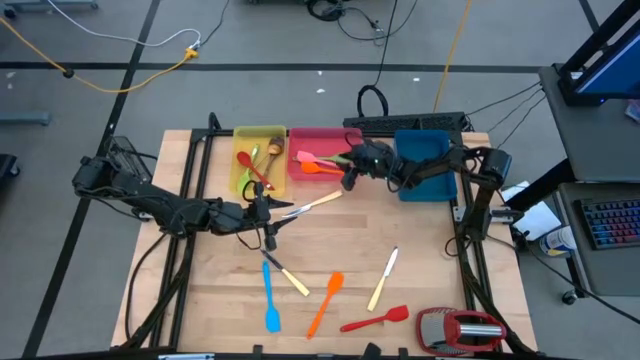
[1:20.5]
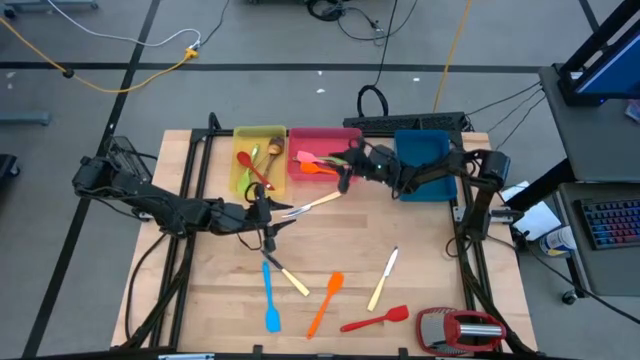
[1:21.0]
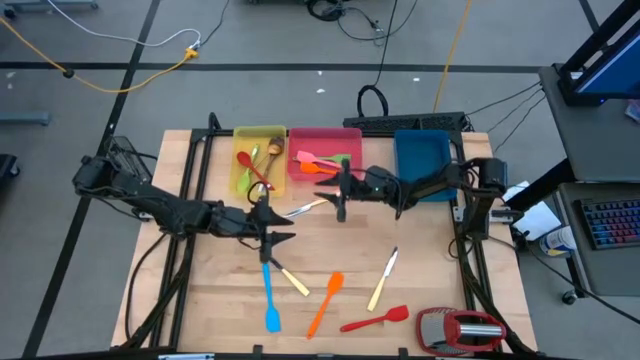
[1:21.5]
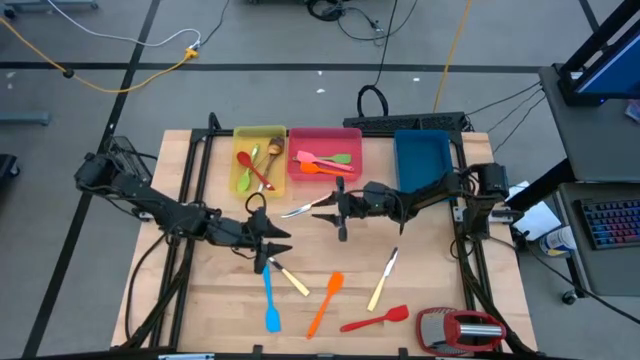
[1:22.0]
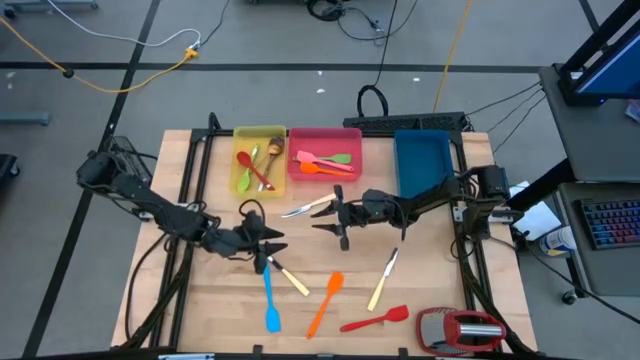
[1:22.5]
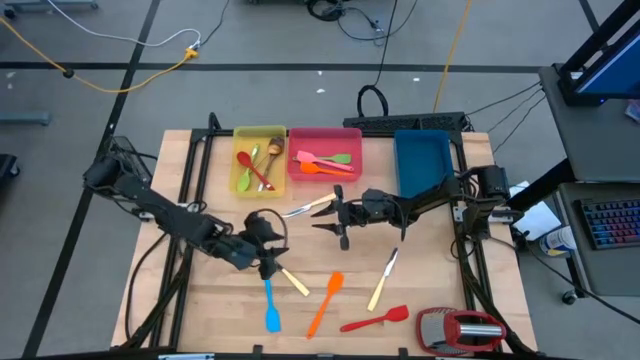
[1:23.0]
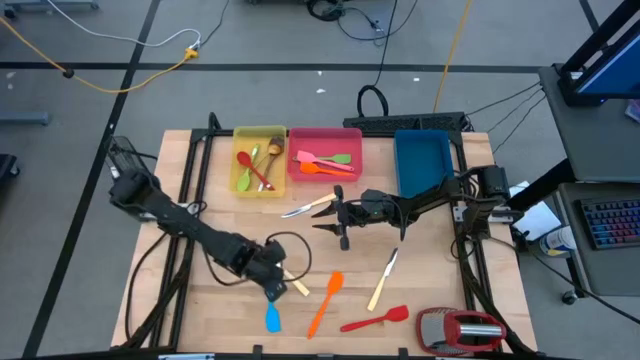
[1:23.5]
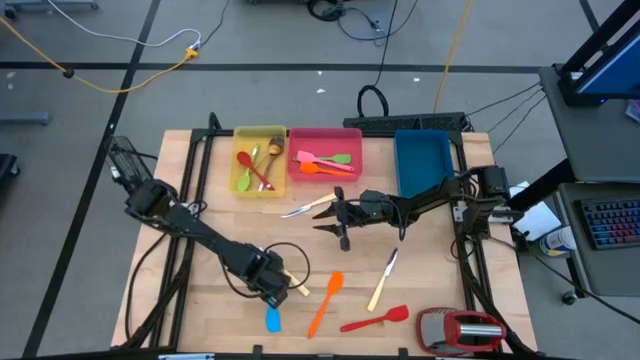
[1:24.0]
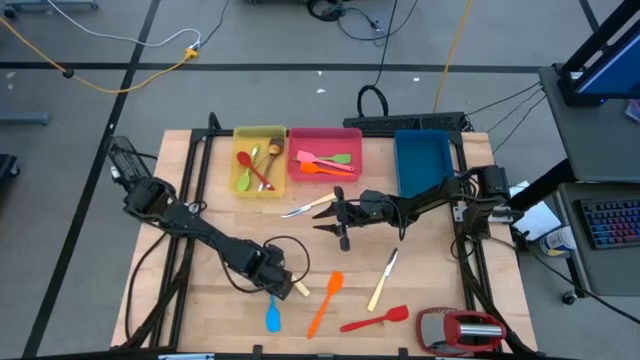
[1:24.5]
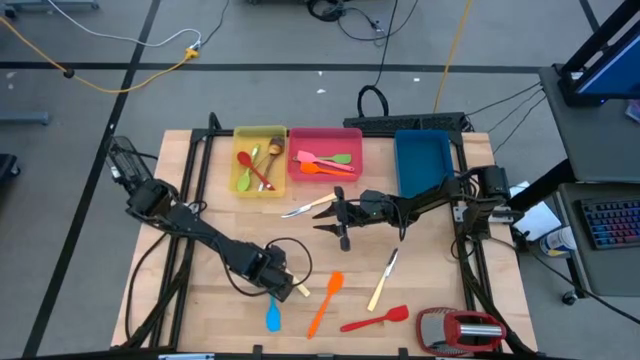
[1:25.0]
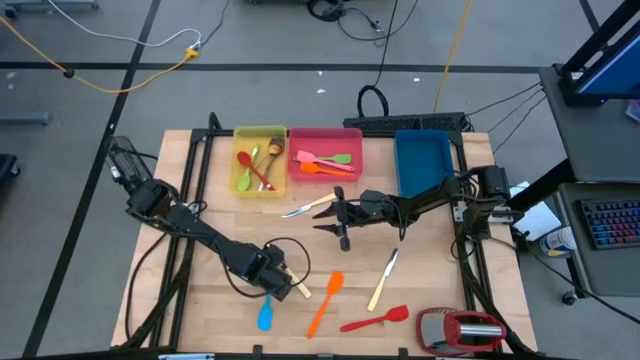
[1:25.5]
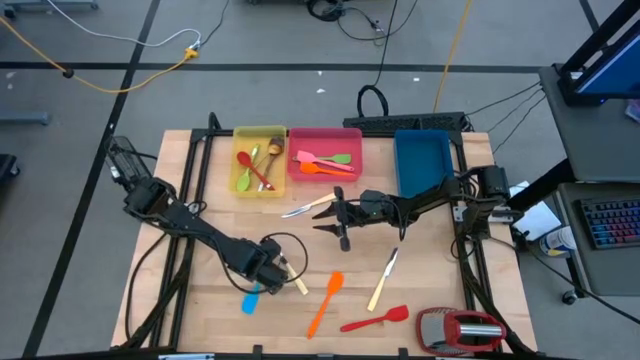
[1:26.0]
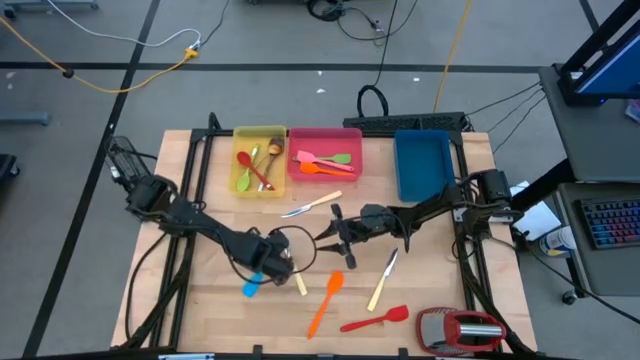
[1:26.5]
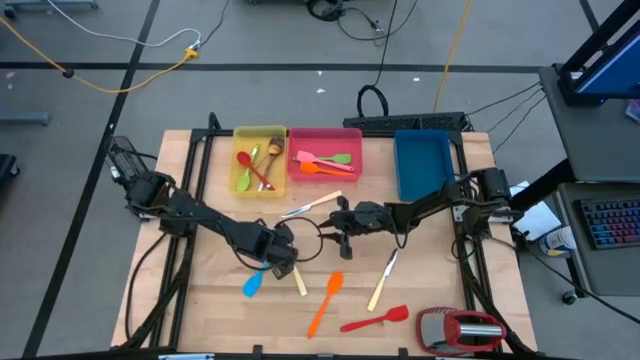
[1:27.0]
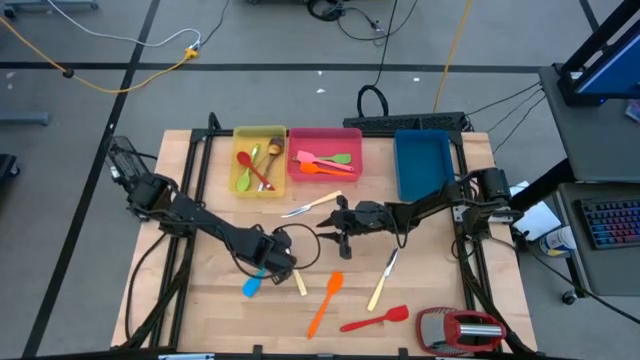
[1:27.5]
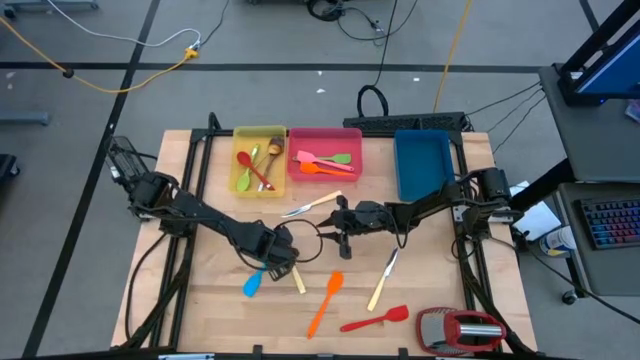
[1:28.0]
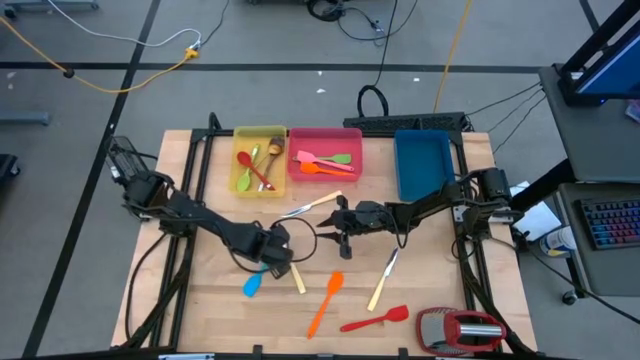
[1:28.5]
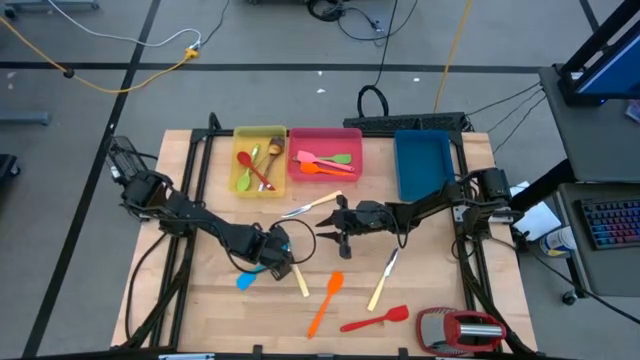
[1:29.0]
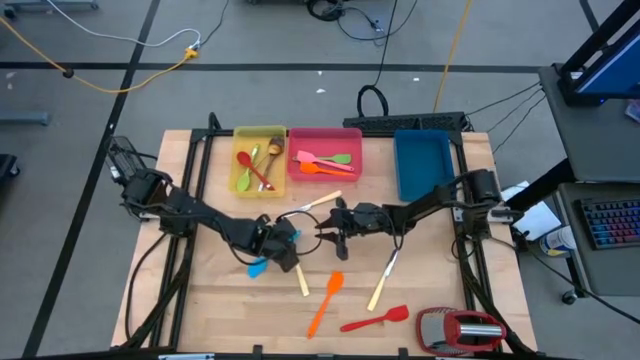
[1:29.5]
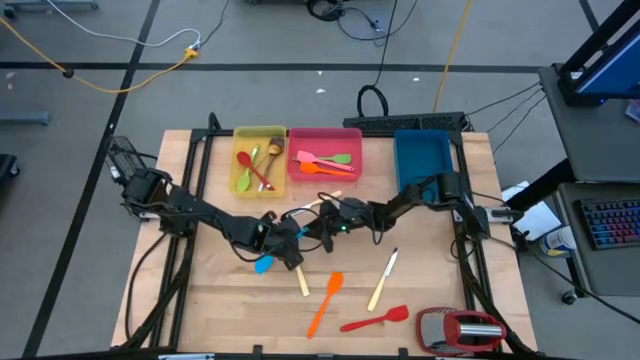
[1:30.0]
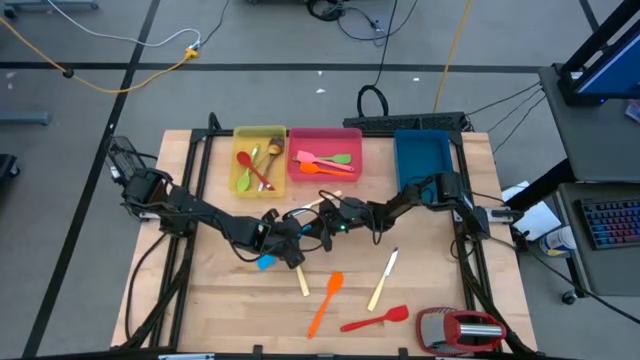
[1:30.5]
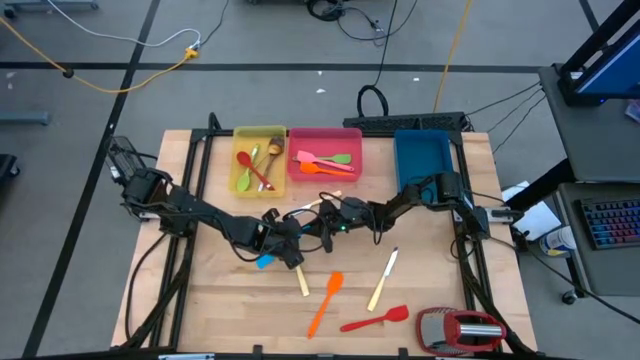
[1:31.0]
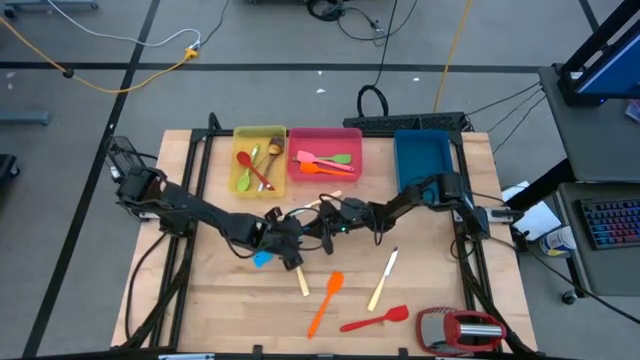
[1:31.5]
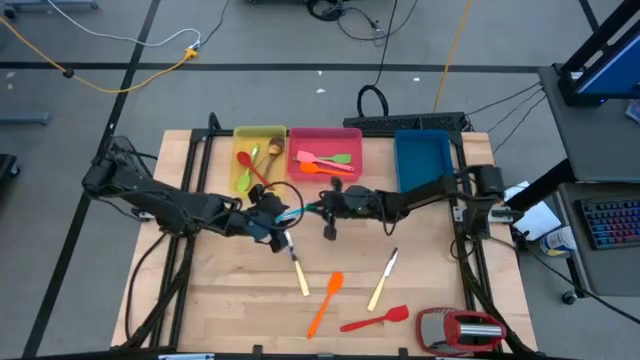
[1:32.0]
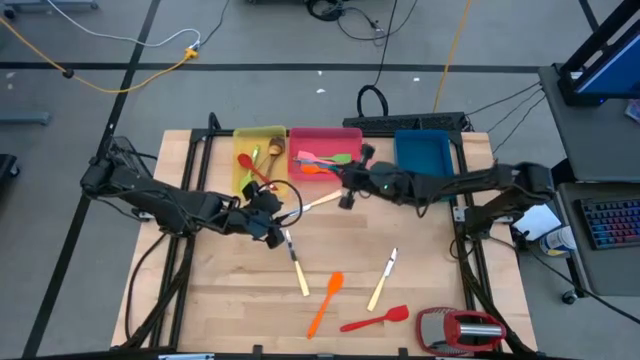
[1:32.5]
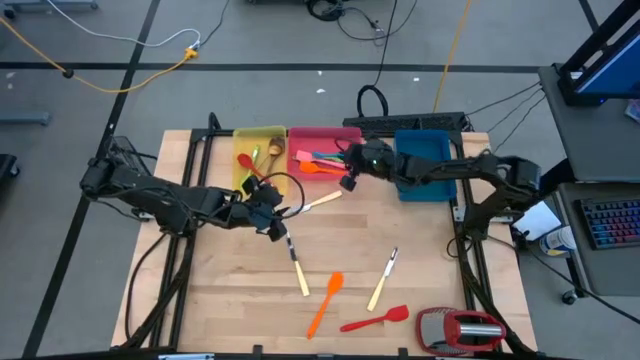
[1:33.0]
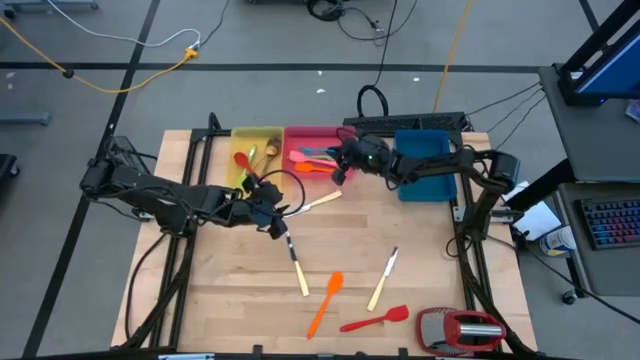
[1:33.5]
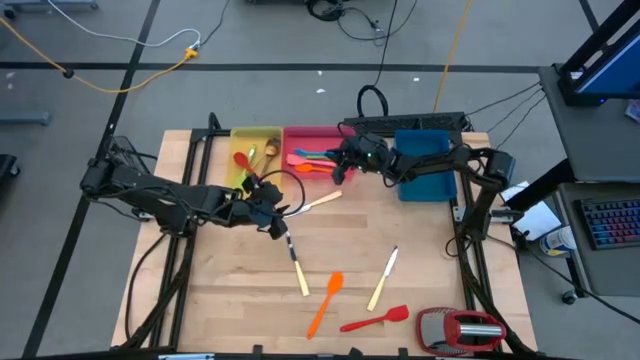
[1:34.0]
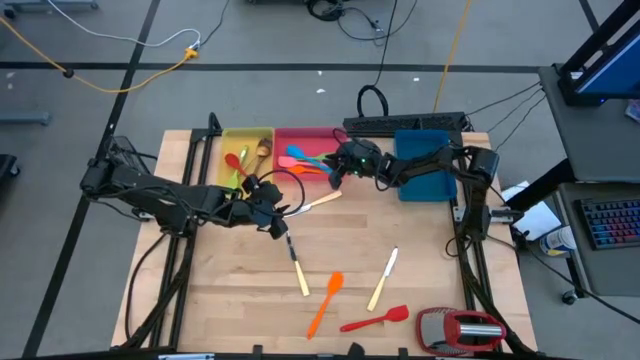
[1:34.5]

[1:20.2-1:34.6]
Task: Pick & Place Kitchen Items
Put the blue spatula into the red bin

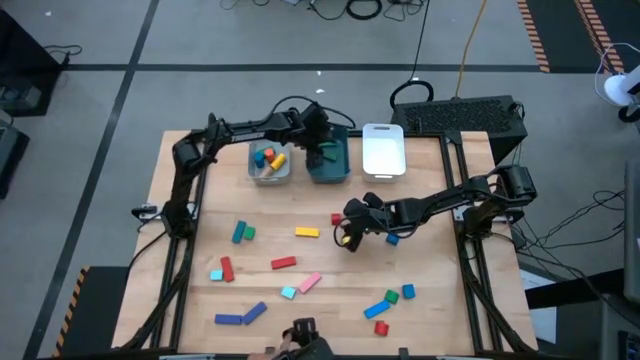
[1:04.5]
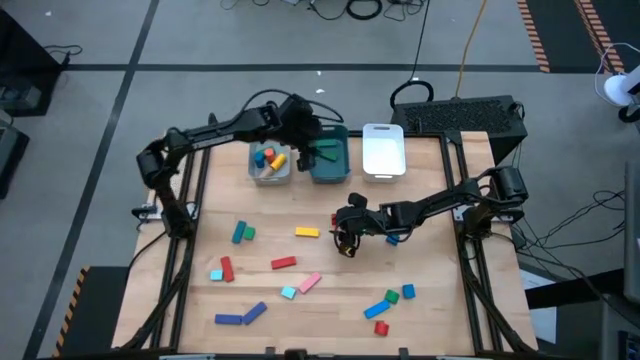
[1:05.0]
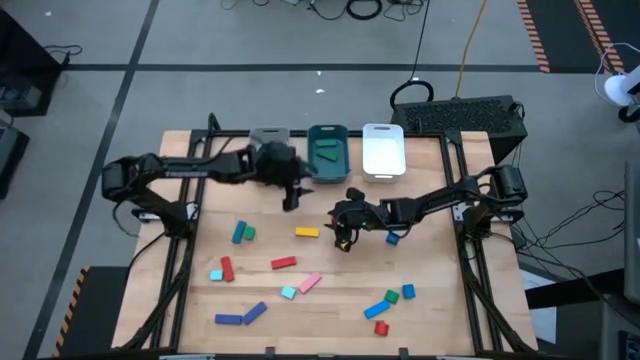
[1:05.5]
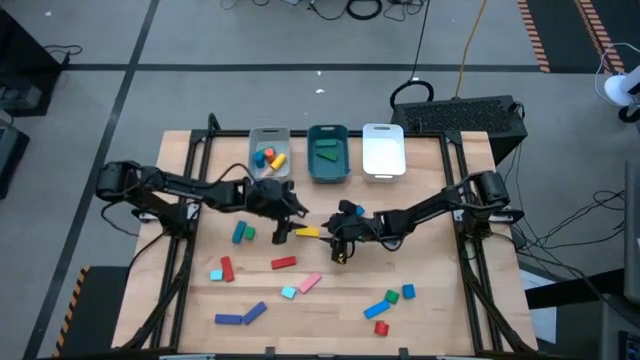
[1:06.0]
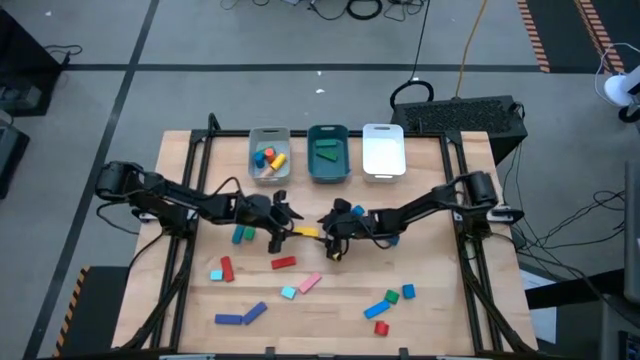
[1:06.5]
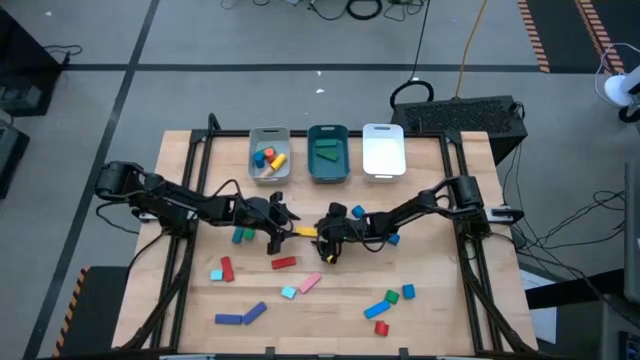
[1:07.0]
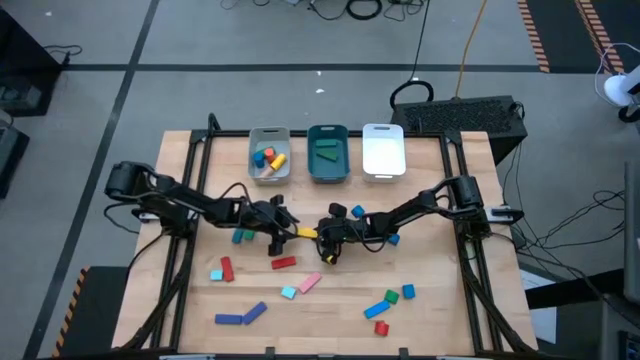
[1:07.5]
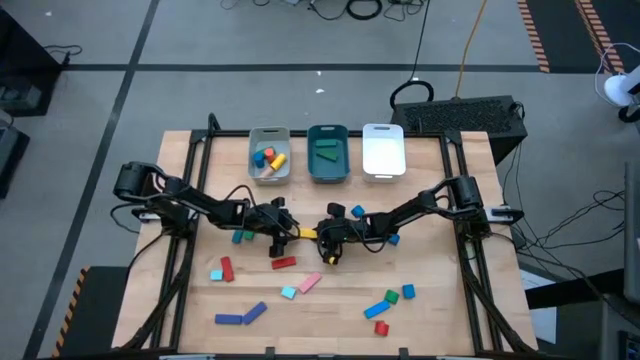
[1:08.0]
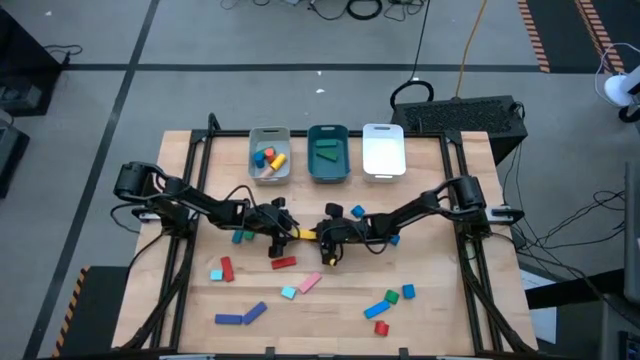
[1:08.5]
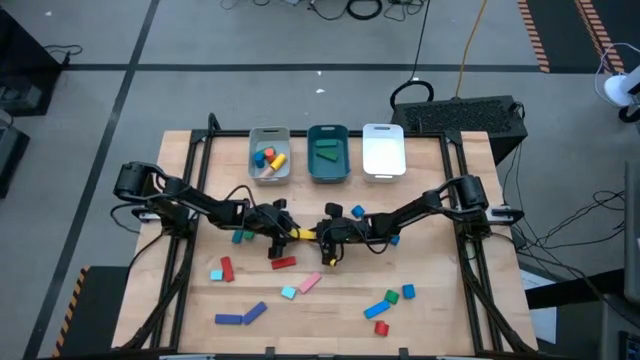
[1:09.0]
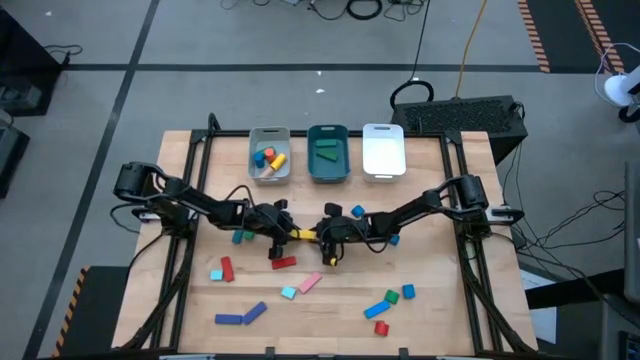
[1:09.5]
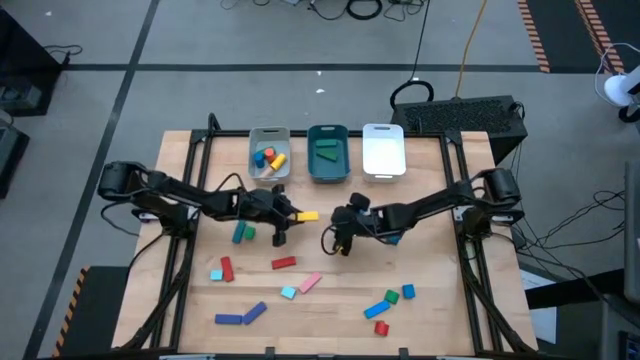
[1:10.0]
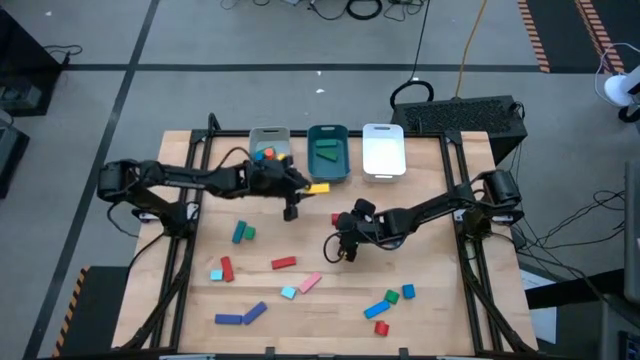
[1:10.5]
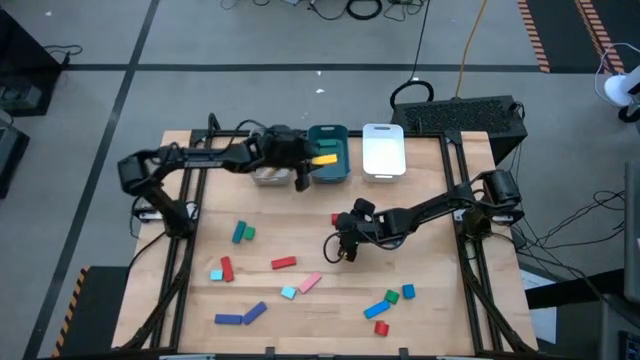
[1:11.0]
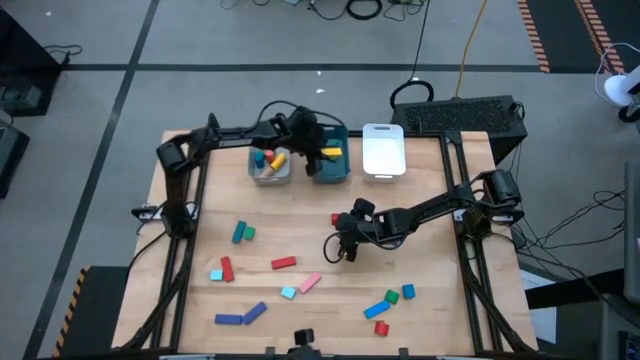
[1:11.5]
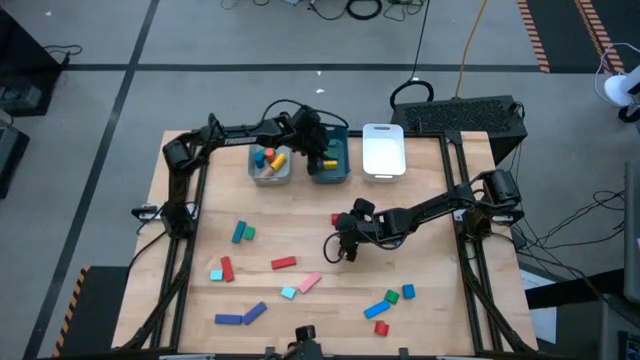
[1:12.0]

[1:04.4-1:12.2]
Task: Sort blocks by size
Put the yellow rectangle block into the blue bin
